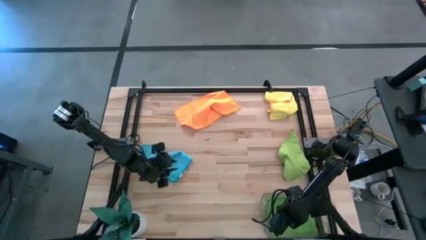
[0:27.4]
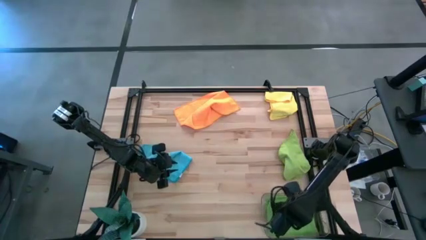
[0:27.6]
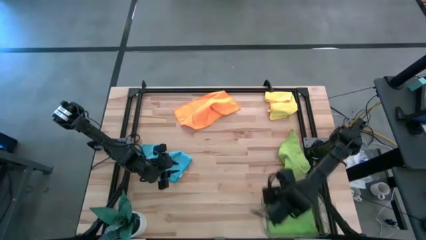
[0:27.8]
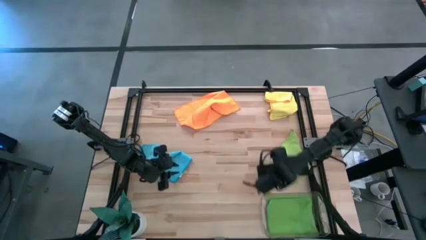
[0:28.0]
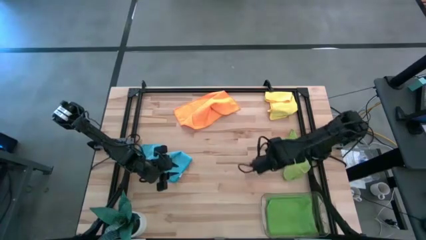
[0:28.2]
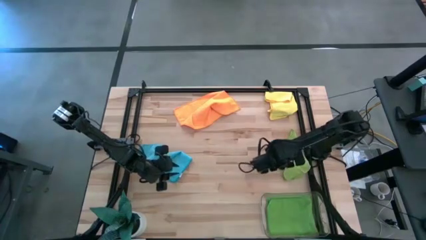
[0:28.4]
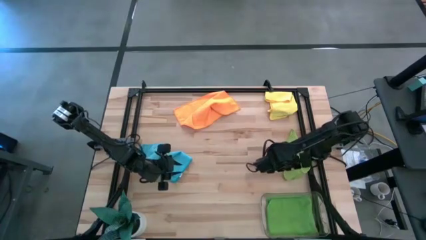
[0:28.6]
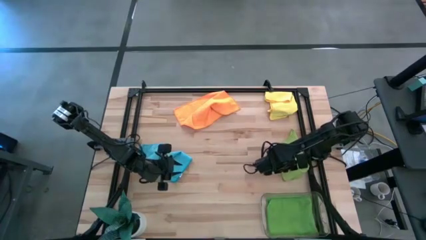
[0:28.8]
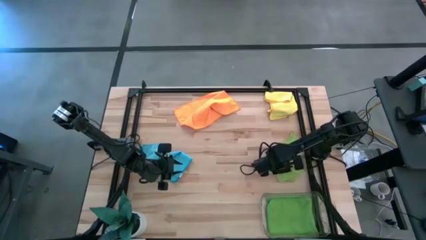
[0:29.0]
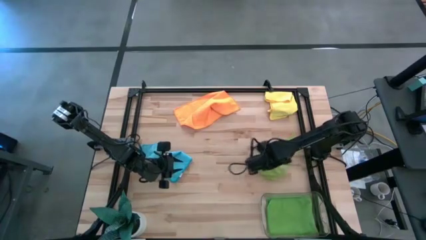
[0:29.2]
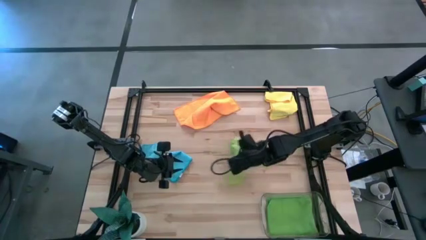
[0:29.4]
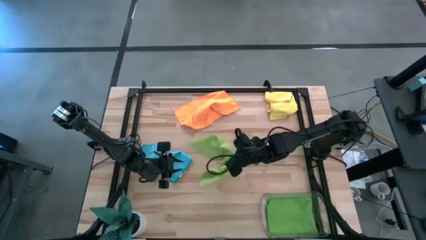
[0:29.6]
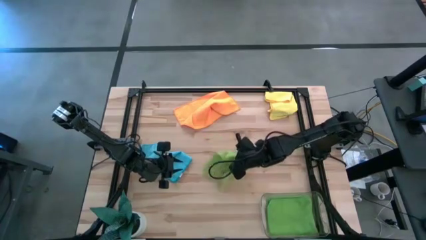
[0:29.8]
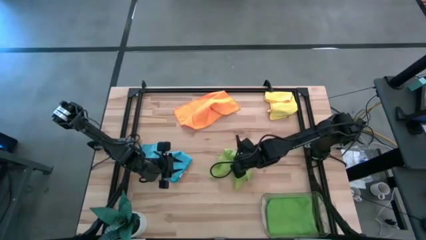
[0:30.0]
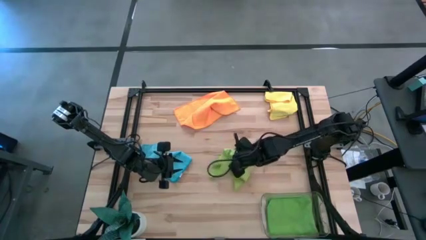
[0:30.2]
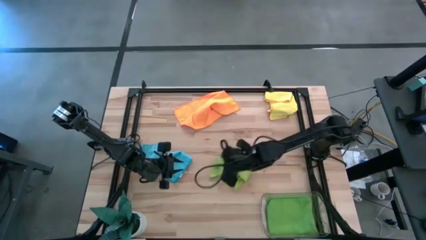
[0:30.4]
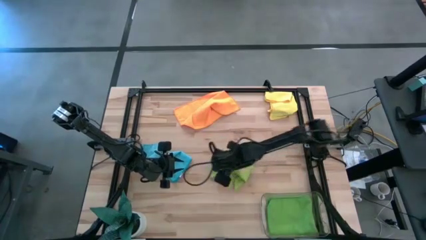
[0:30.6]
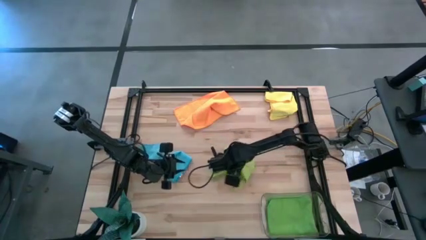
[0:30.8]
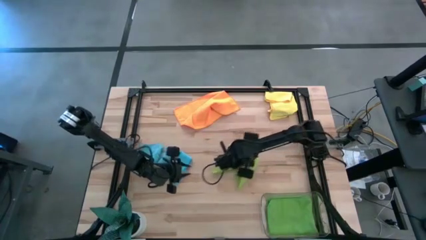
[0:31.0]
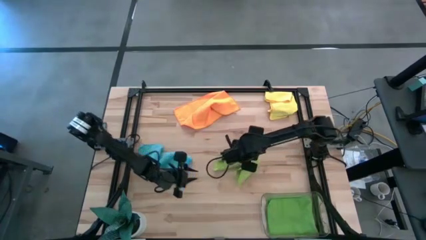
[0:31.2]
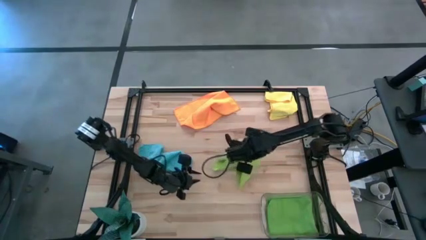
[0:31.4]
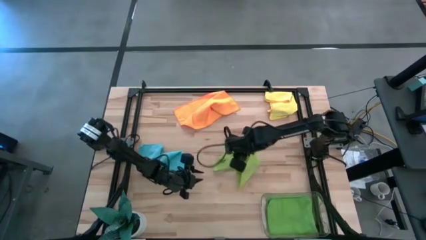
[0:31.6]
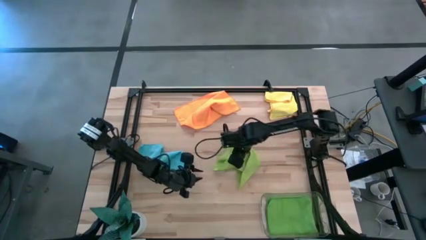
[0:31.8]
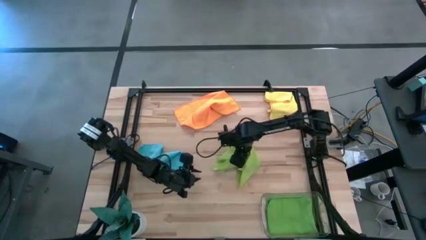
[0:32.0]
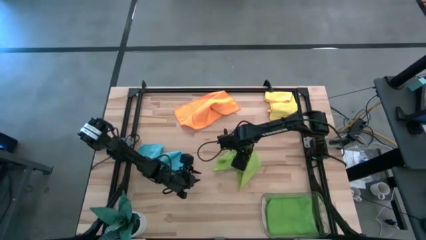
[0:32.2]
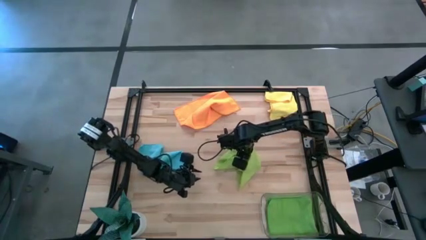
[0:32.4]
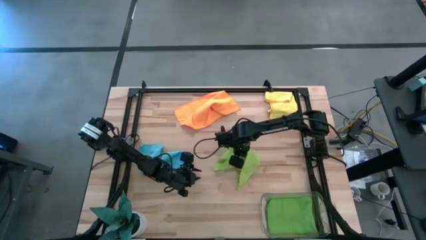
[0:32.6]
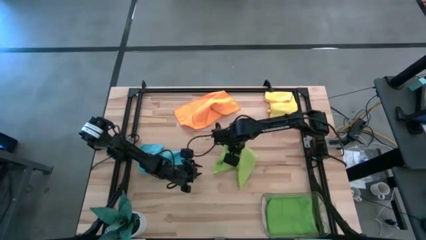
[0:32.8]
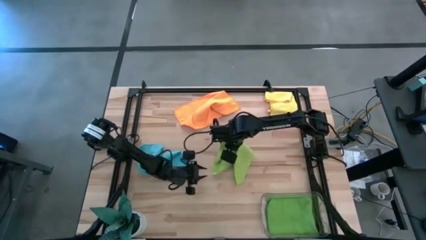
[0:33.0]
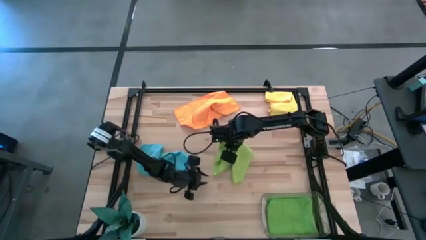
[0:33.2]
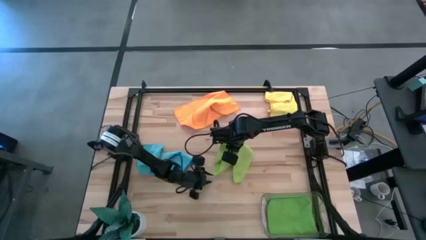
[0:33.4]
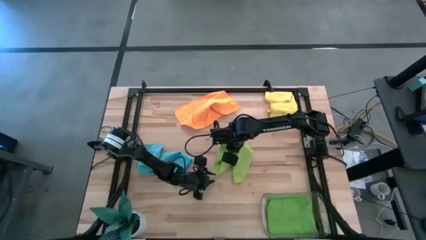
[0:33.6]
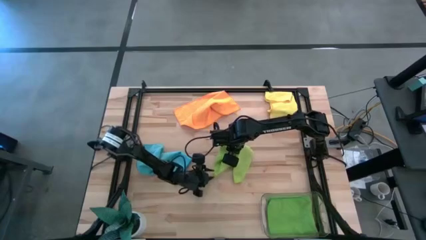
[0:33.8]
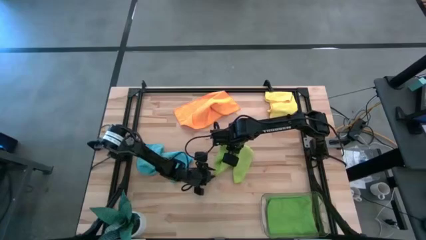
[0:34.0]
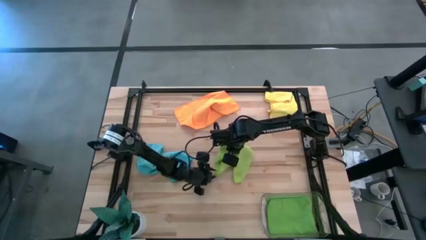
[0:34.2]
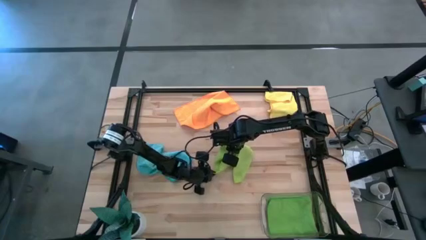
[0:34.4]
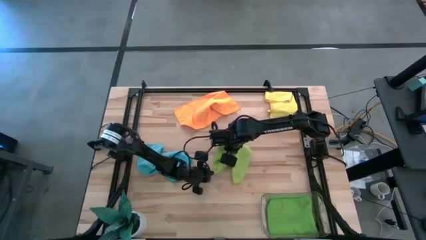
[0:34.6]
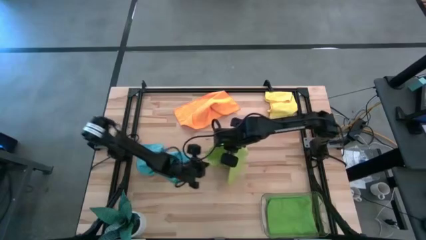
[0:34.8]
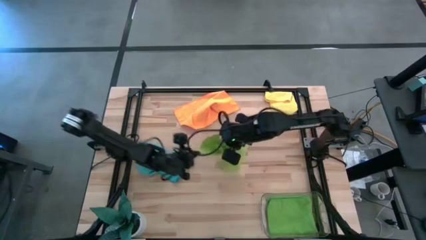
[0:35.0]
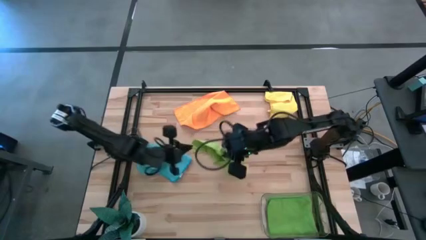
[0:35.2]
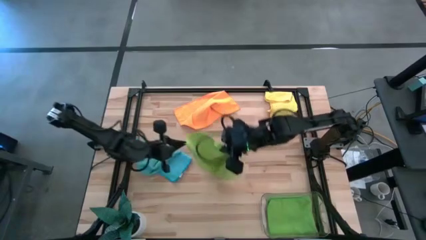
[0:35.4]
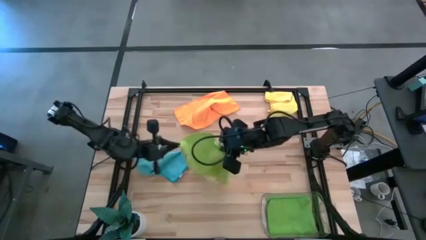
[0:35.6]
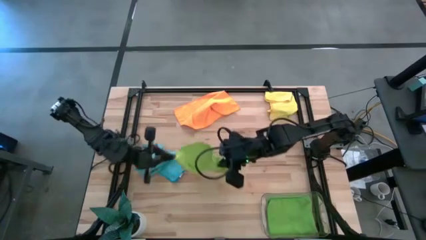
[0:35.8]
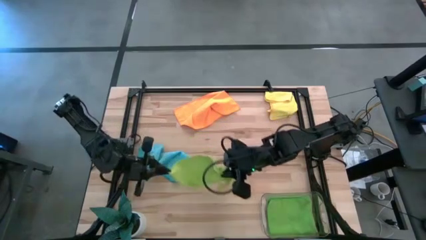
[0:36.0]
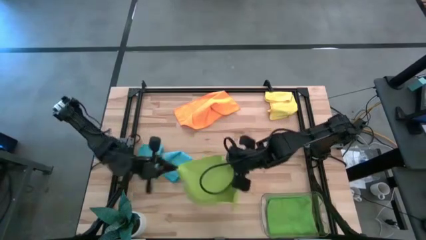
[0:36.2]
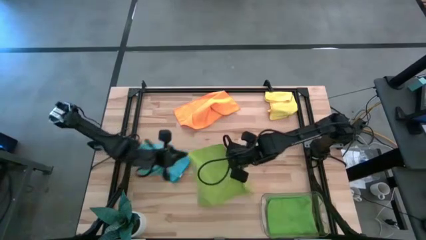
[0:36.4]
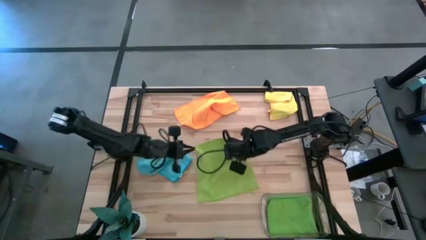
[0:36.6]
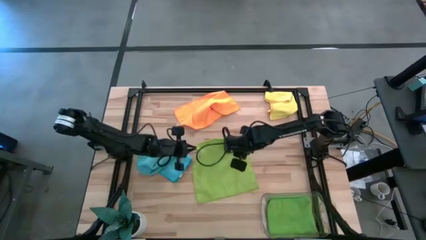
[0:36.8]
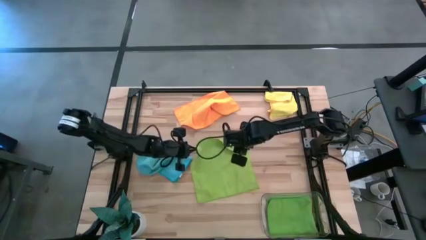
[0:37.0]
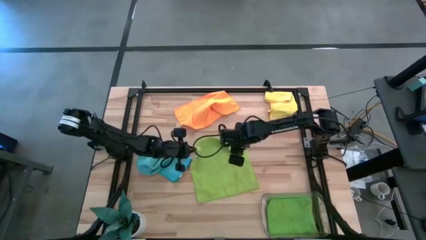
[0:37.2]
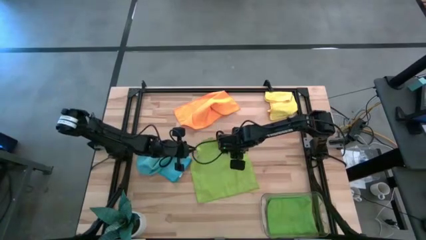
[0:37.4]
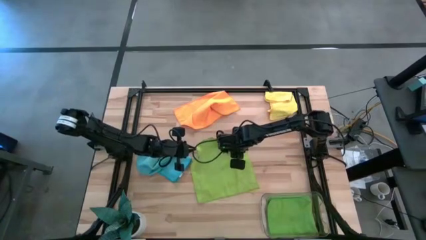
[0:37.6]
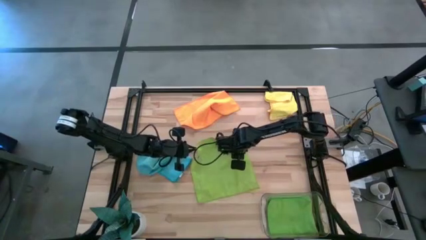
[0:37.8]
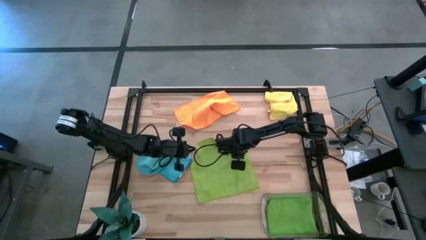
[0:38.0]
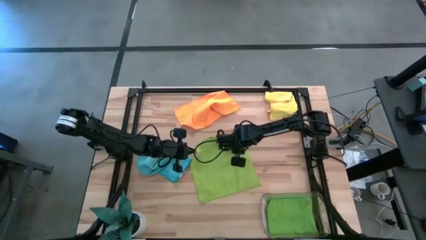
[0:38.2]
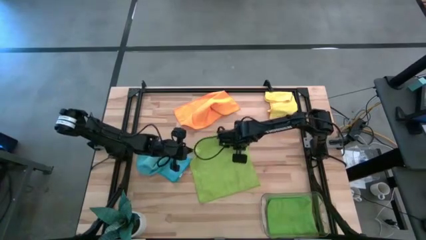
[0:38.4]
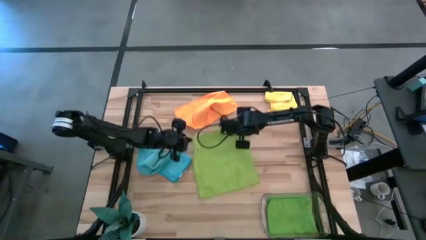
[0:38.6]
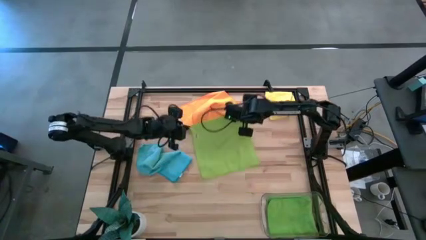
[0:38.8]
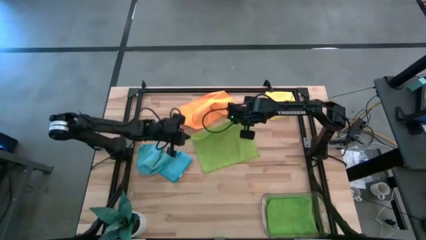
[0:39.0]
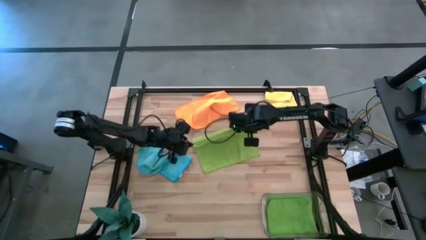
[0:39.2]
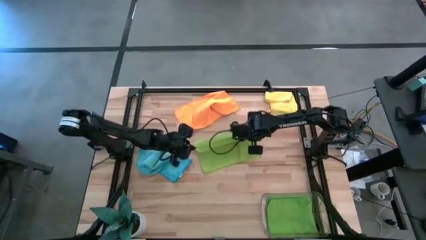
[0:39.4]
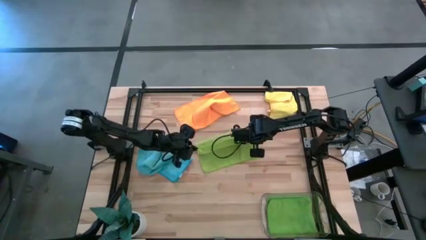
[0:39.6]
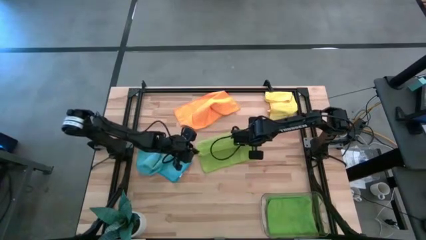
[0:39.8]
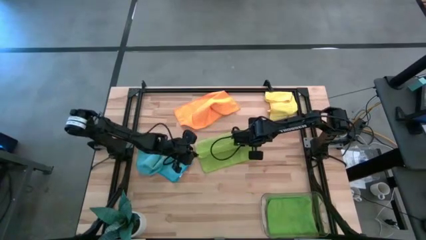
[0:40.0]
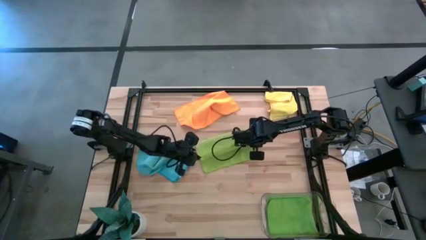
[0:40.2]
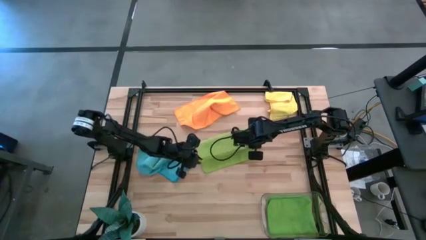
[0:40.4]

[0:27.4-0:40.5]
Task: Fold microfiber towels
Fold the light green microfiber towel

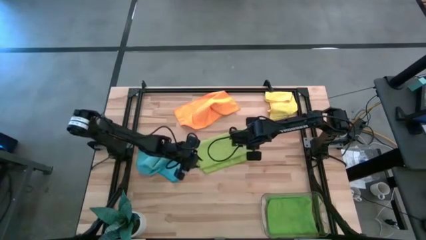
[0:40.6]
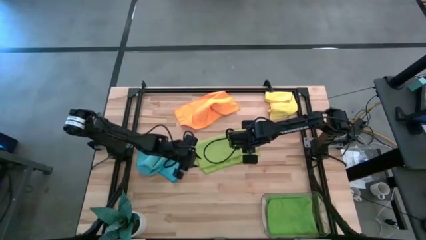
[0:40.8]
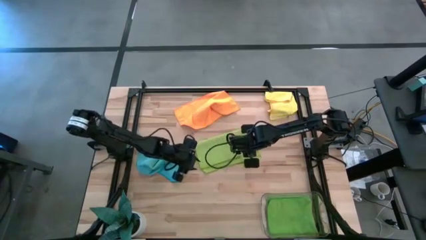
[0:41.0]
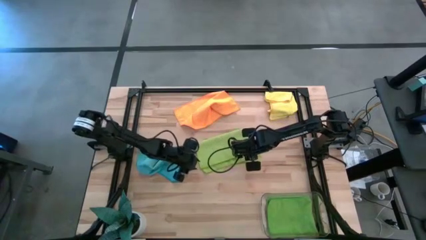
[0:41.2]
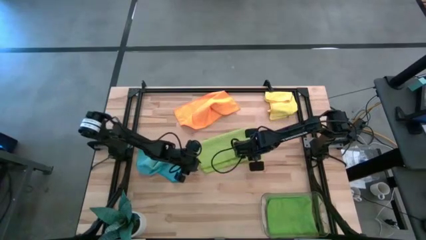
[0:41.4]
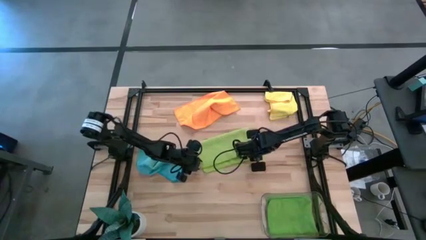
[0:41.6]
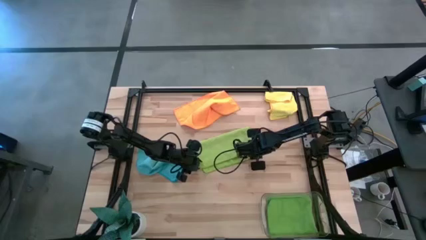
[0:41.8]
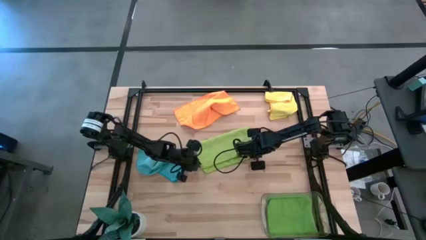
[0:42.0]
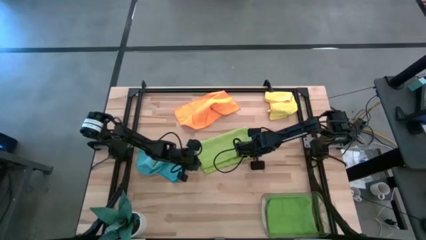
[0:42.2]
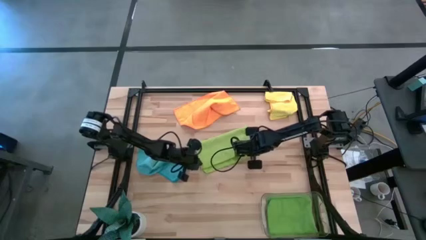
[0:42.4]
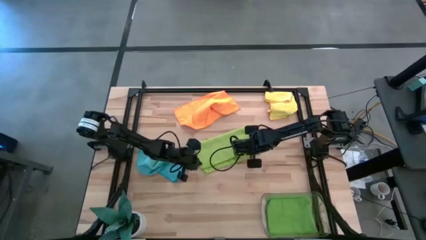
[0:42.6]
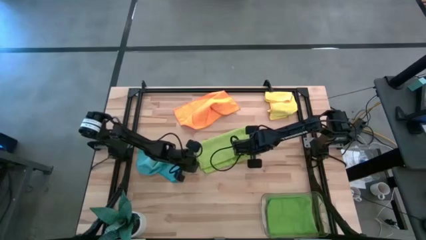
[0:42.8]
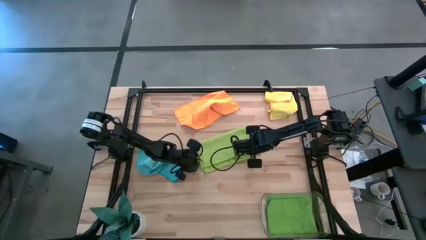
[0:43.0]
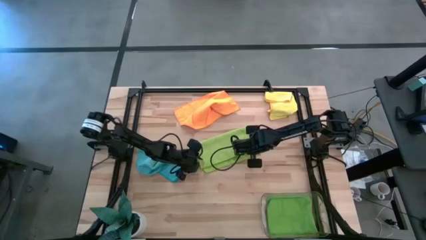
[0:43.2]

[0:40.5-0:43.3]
Fold the light green microfiber towel
